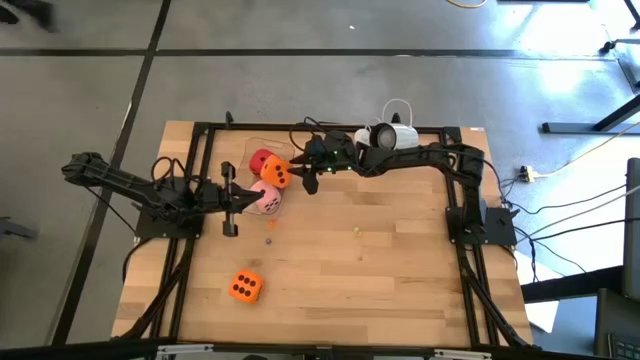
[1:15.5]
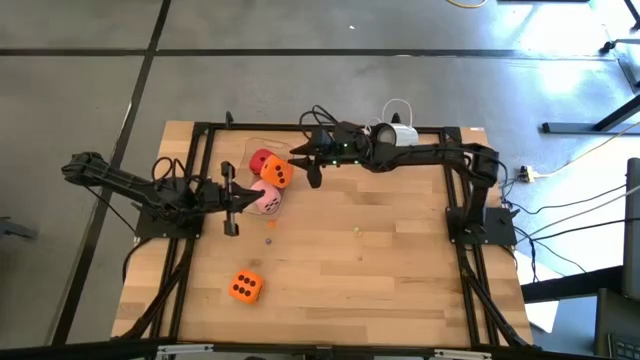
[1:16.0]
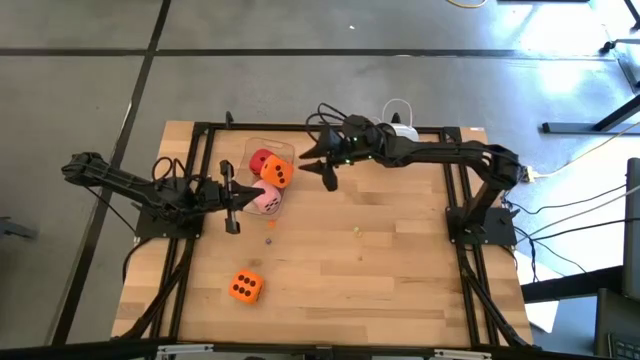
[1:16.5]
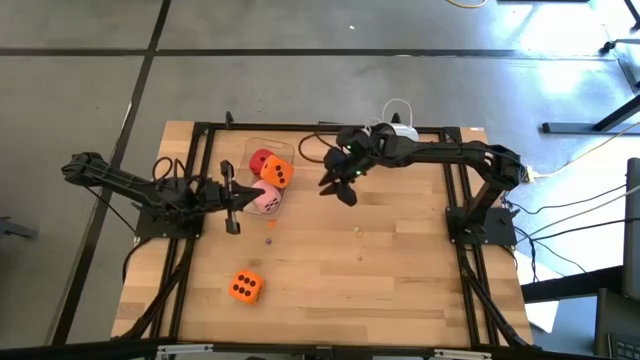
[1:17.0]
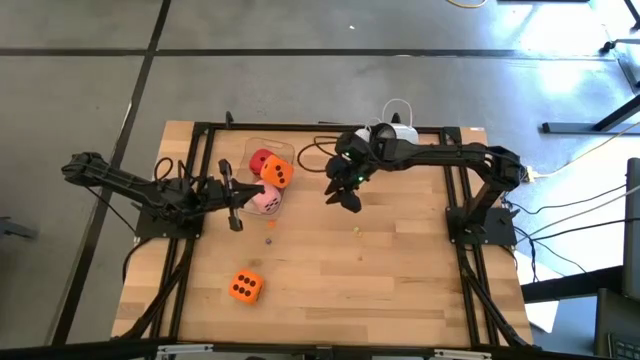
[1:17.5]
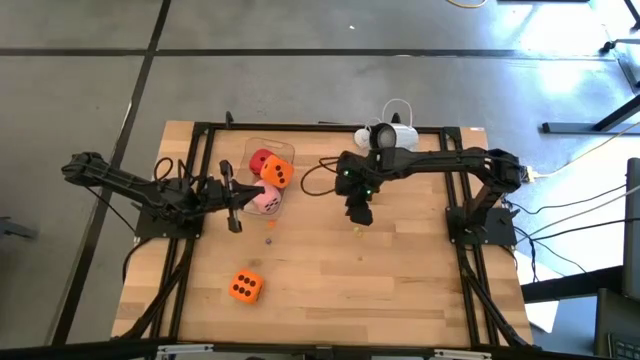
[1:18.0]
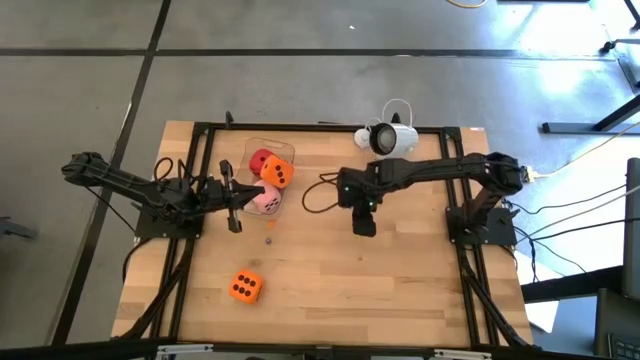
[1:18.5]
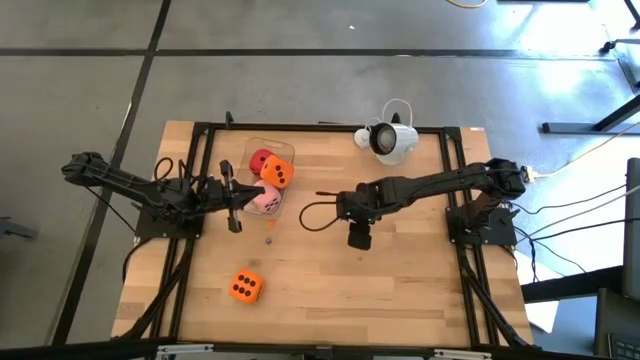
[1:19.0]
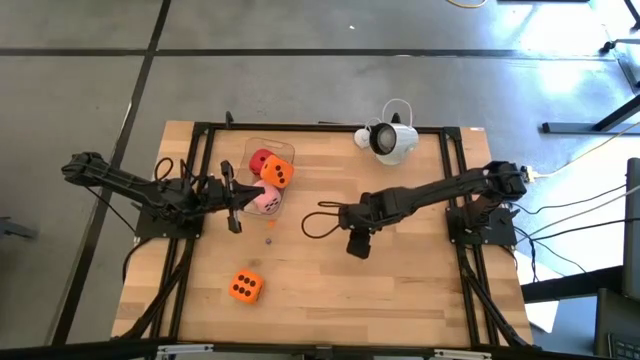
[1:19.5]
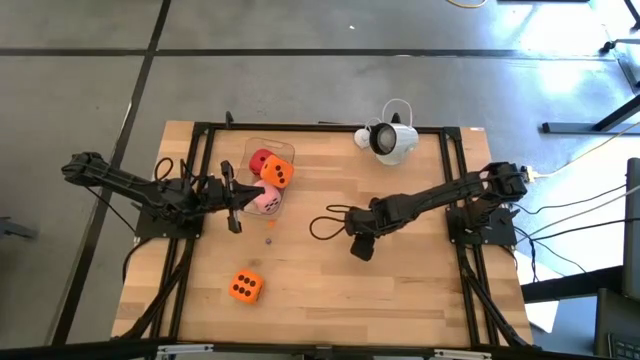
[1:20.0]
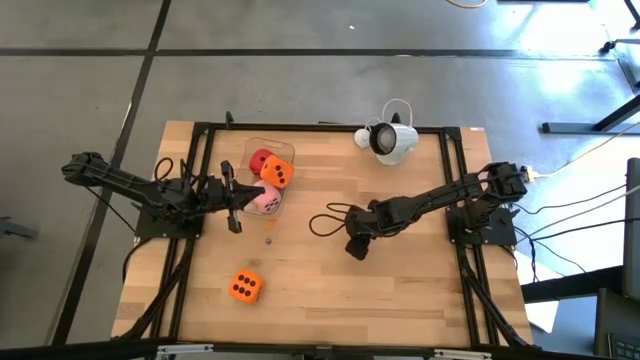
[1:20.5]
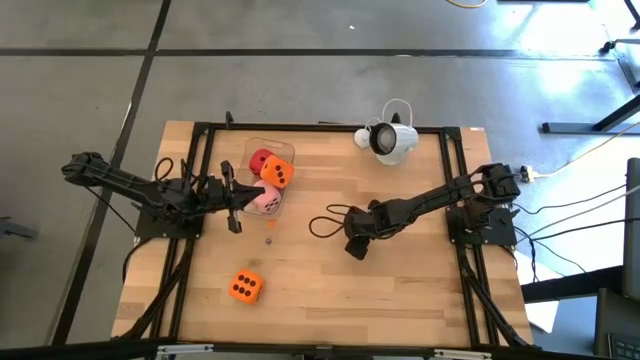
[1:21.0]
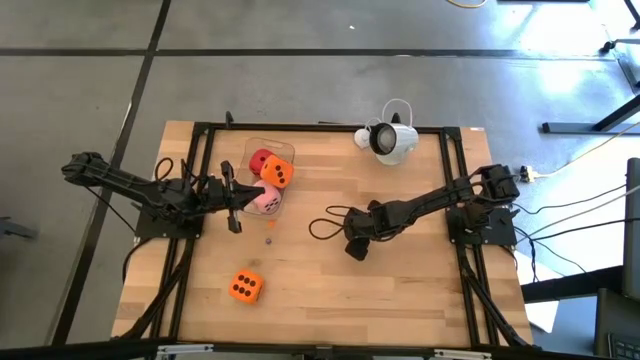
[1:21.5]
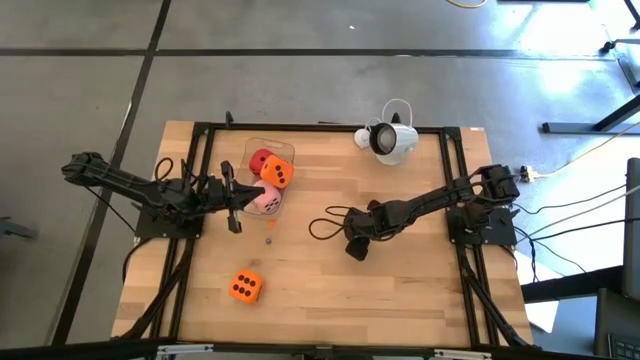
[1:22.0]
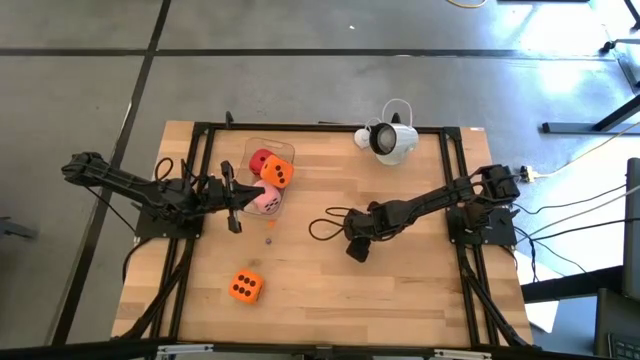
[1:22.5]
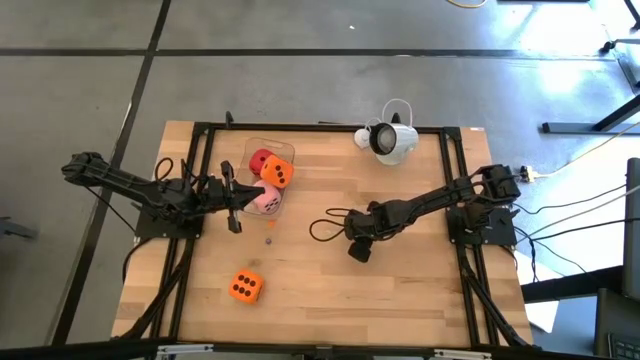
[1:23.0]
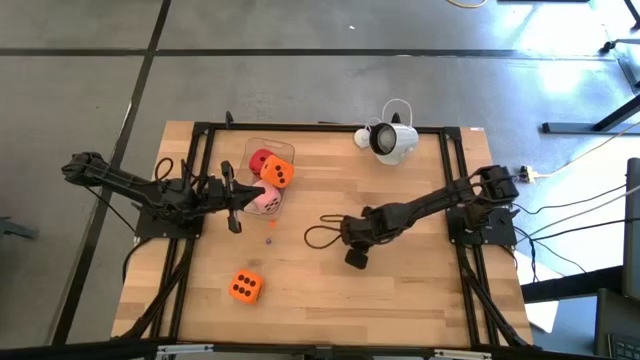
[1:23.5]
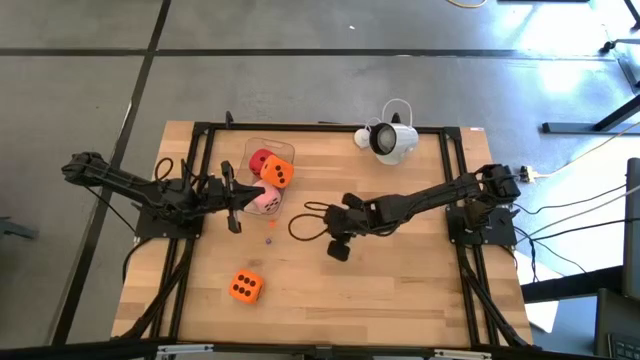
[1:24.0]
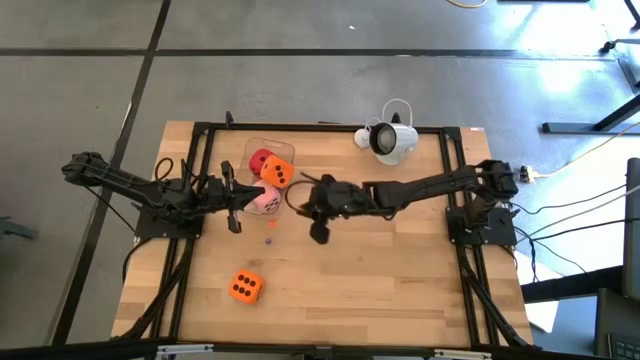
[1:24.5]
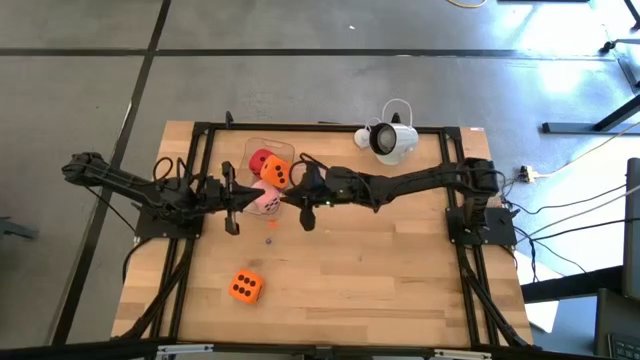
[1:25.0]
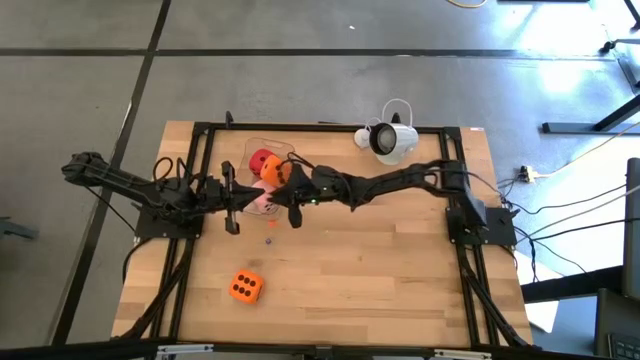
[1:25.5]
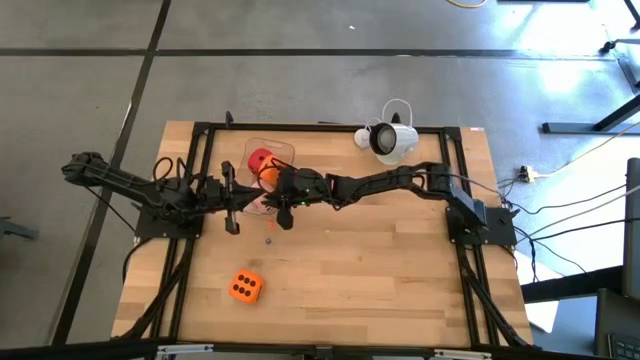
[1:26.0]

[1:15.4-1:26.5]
Task: Pick & Place Dice
Put the small yellow die into the transparent bin

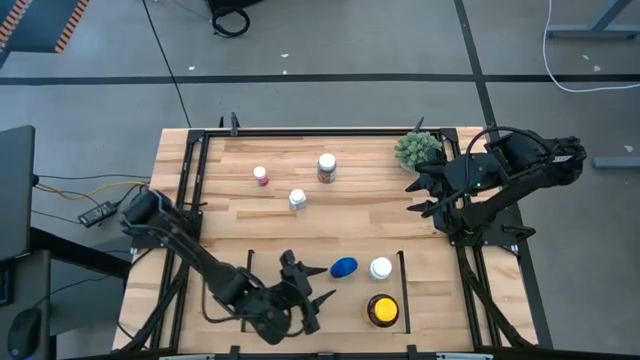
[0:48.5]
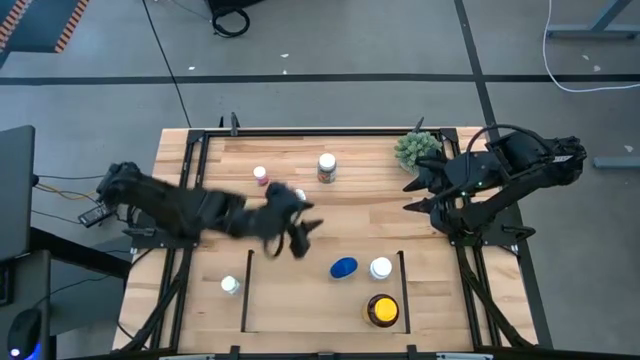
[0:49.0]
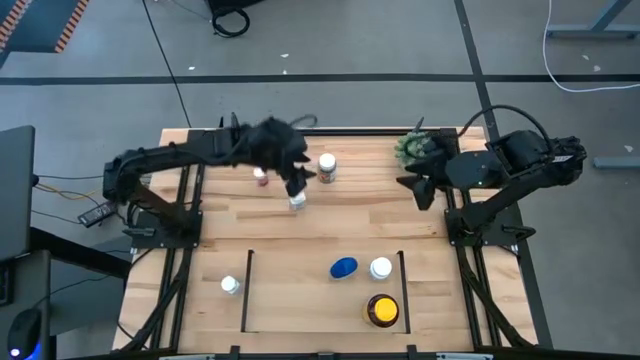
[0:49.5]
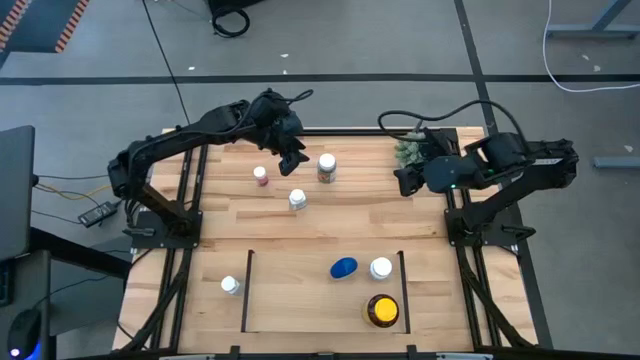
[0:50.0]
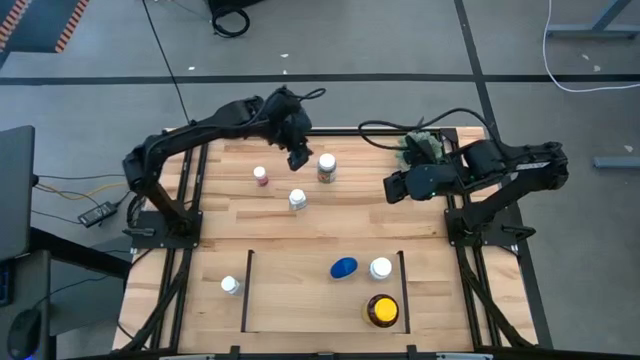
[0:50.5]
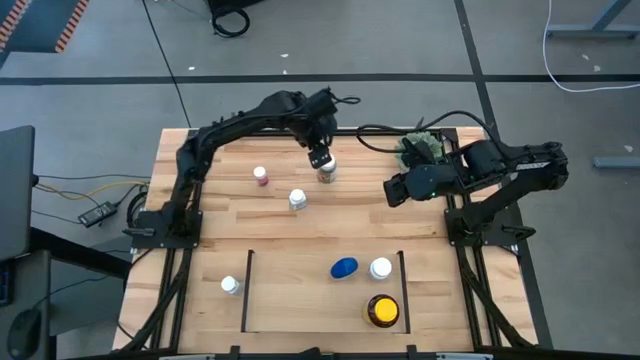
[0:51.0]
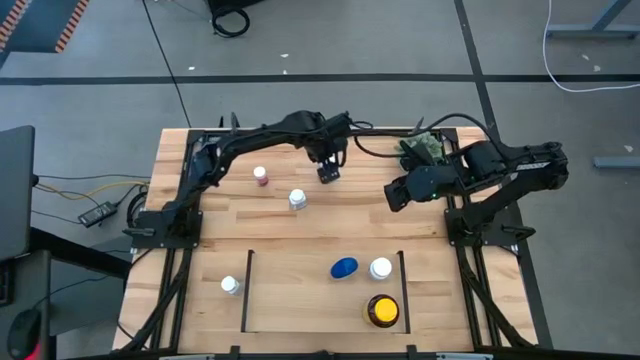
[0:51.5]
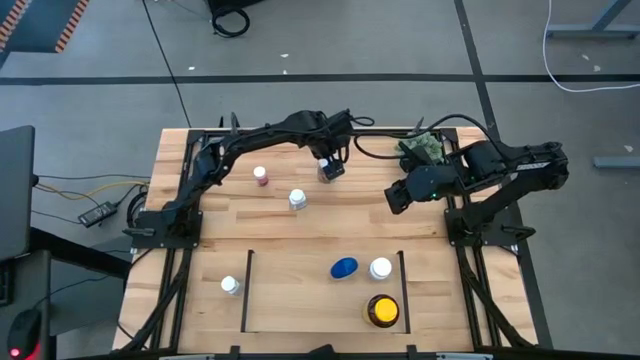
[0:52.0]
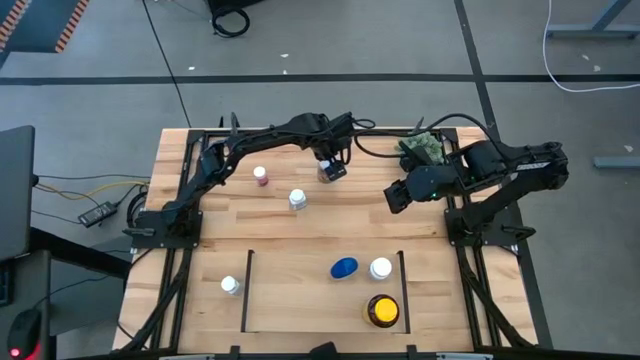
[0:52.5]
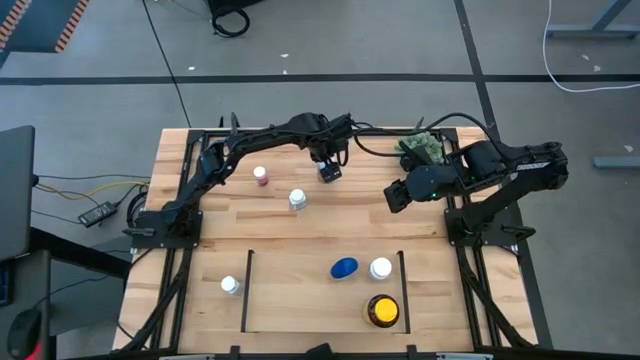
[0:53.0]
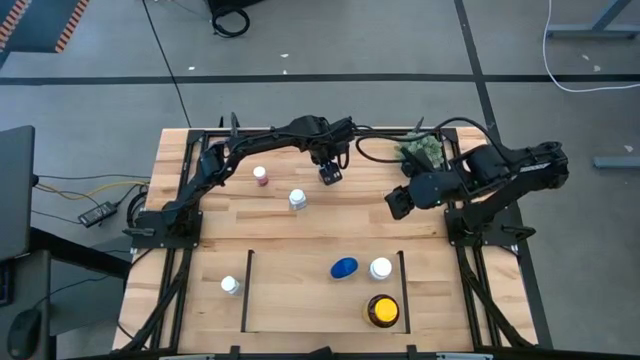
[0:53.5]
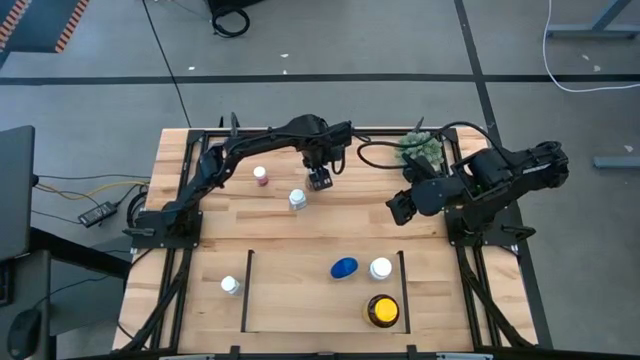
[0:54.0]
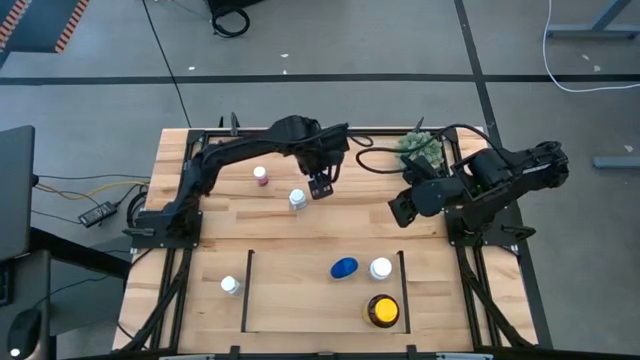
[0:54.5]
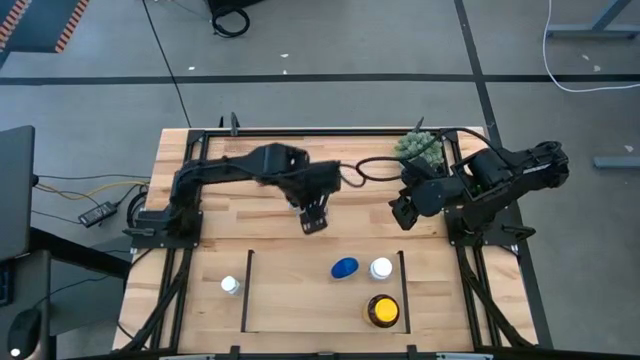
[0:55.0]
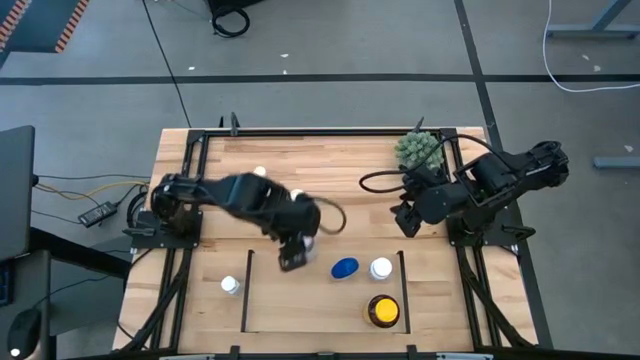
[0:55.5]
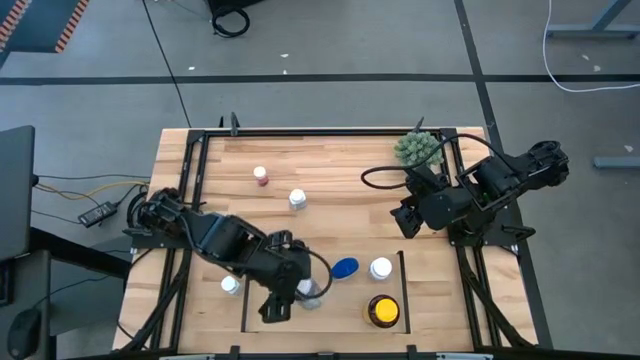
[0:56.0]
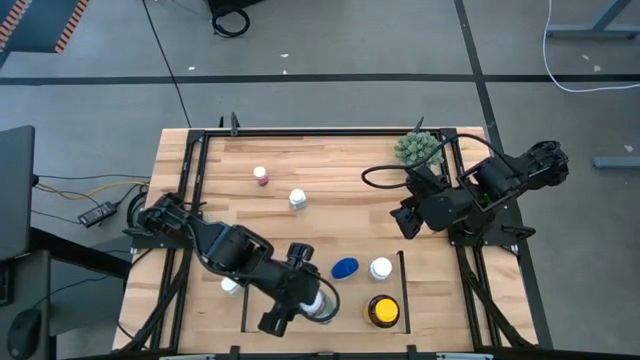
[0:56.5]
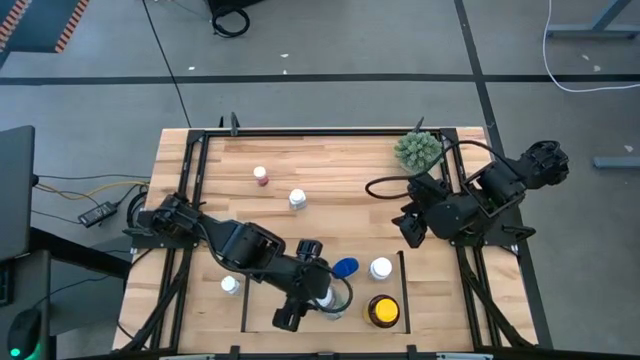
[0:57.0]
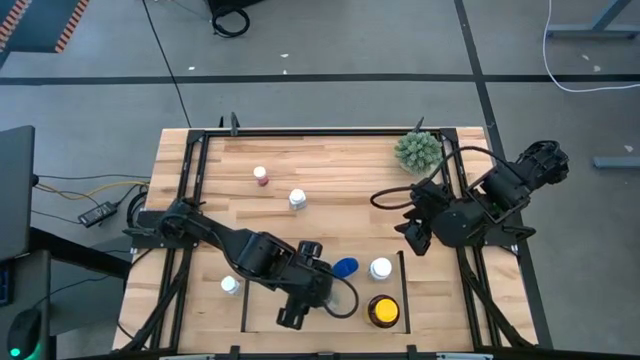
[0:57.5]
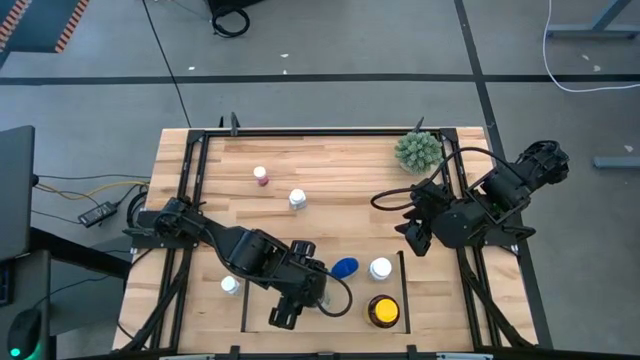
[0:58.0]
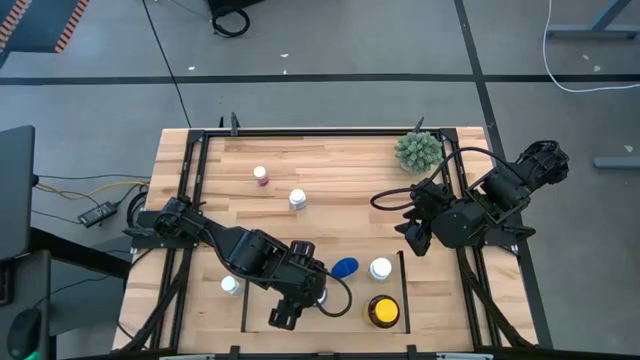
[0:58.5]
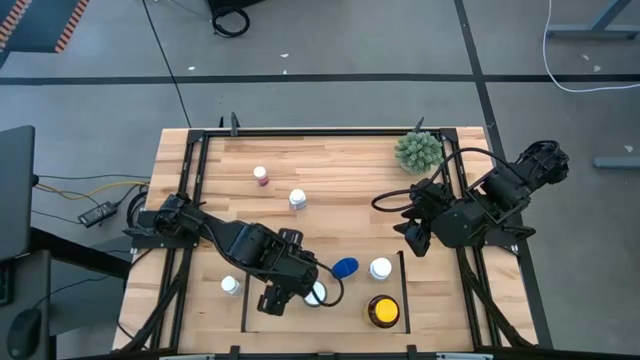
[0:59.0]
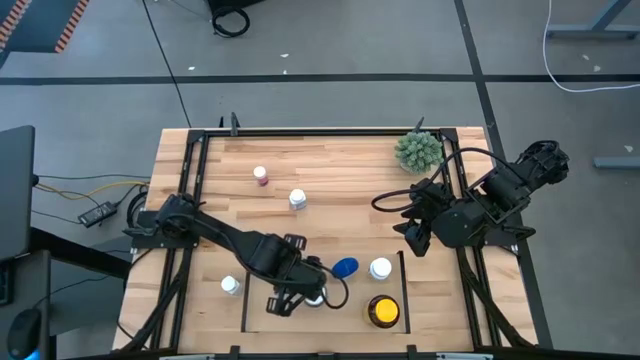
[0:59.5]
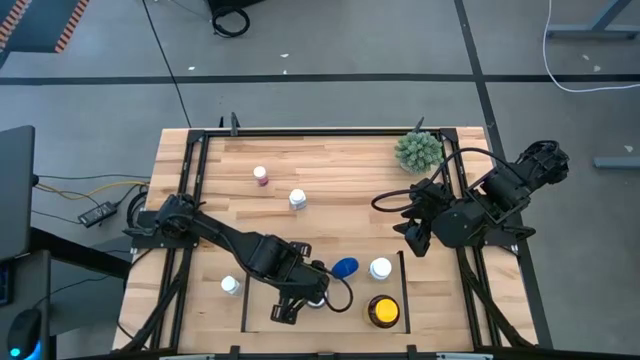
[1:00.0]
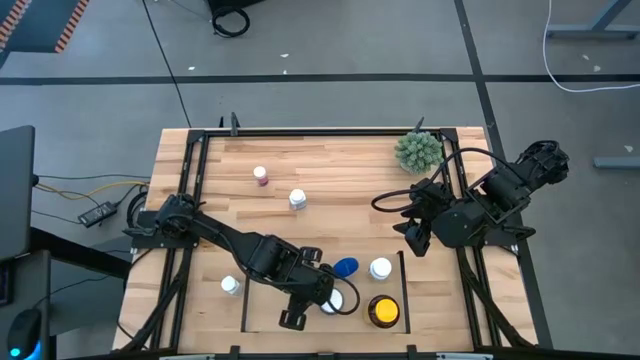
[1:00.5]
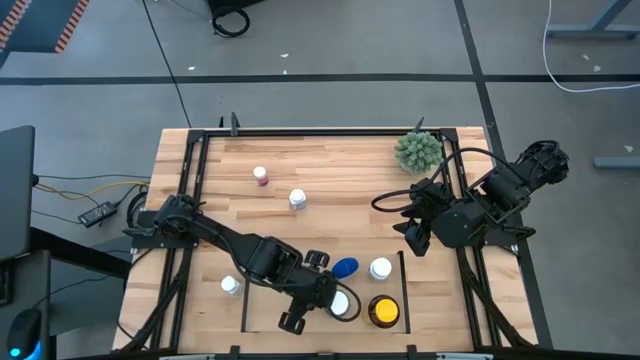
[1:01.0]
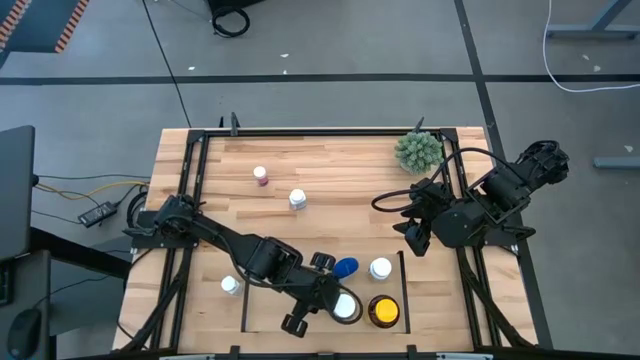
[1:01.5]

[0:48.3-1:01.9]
Task: Pick and place medicine bottles onto shelf by color
Put the green medicine bottle on the shelf
